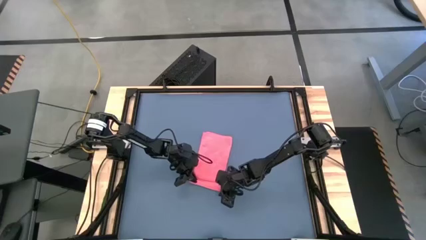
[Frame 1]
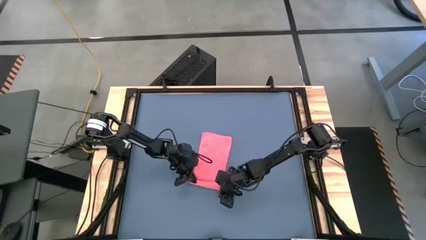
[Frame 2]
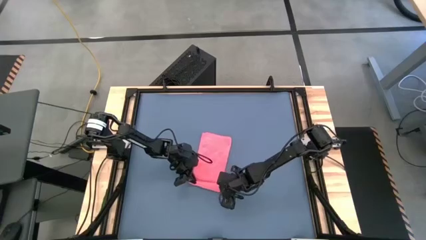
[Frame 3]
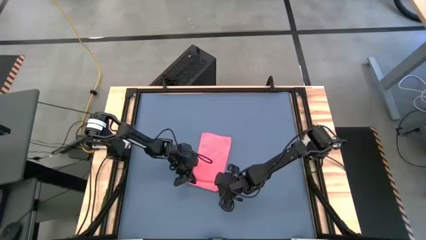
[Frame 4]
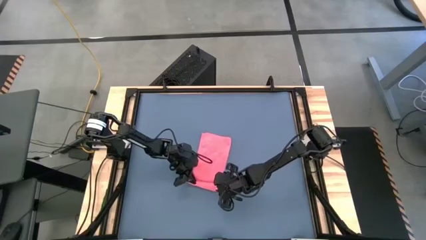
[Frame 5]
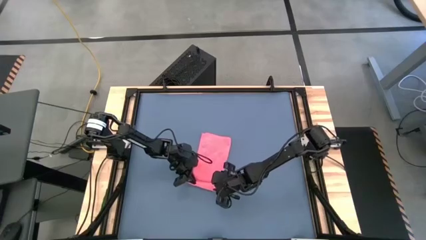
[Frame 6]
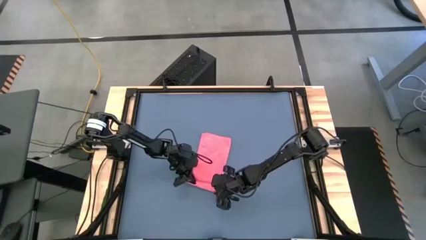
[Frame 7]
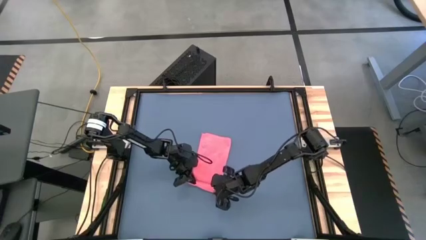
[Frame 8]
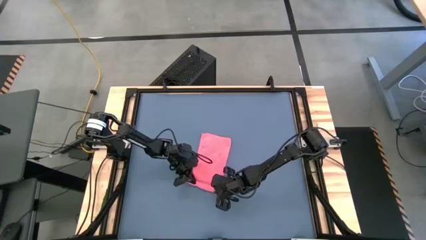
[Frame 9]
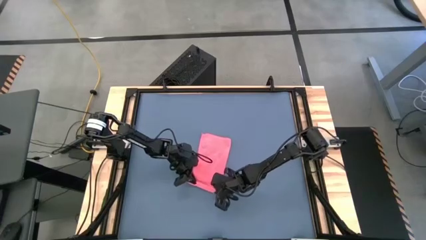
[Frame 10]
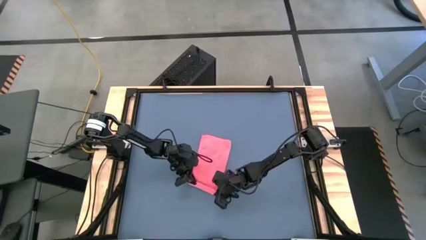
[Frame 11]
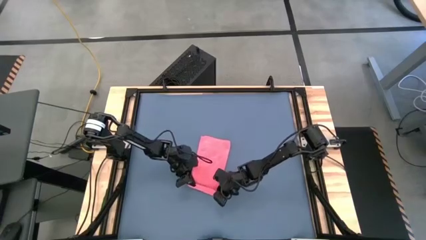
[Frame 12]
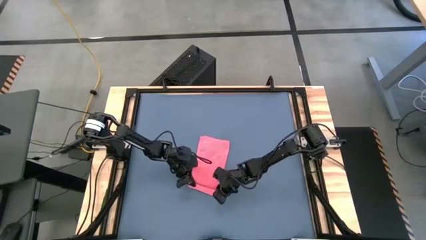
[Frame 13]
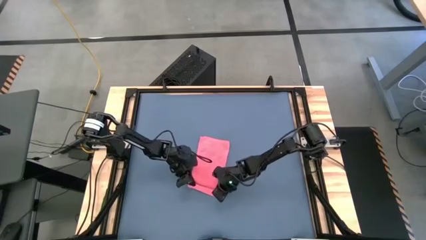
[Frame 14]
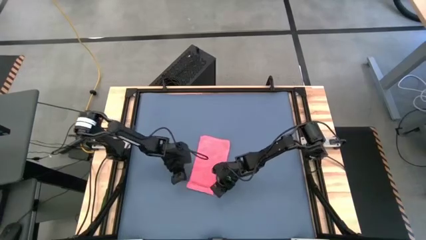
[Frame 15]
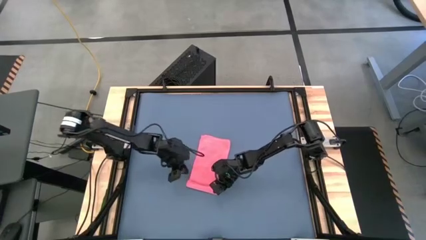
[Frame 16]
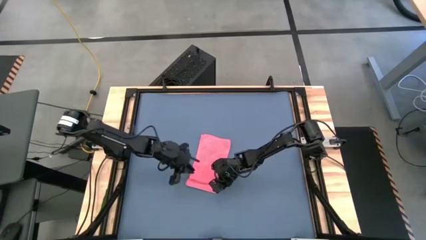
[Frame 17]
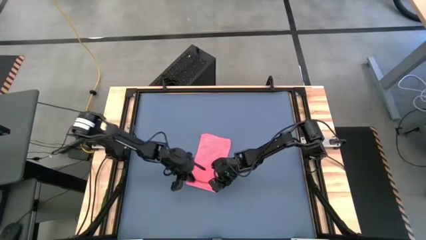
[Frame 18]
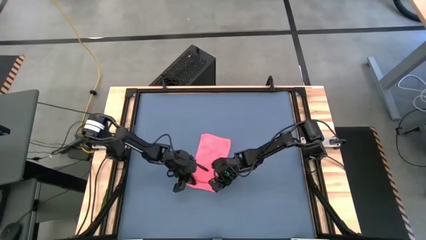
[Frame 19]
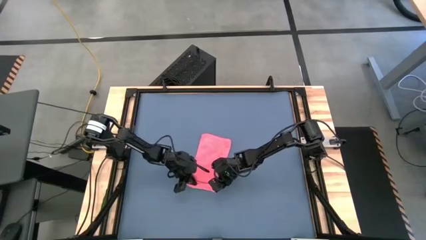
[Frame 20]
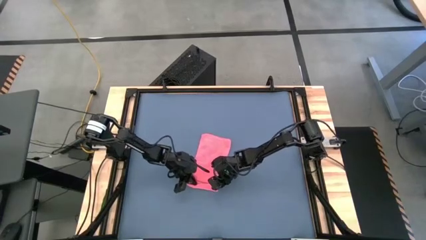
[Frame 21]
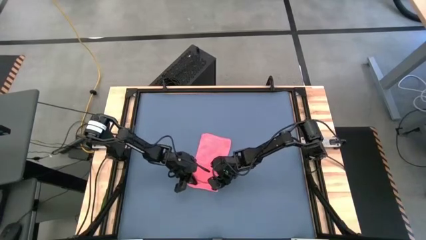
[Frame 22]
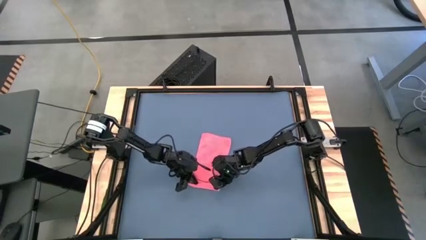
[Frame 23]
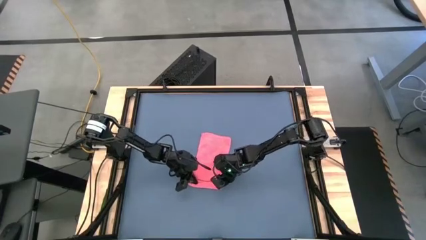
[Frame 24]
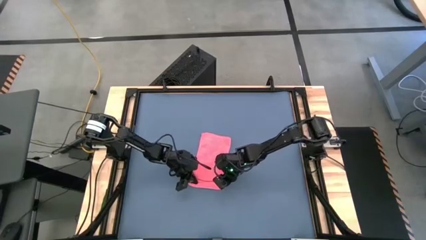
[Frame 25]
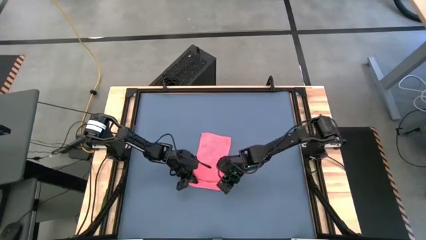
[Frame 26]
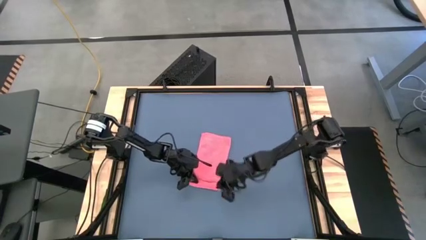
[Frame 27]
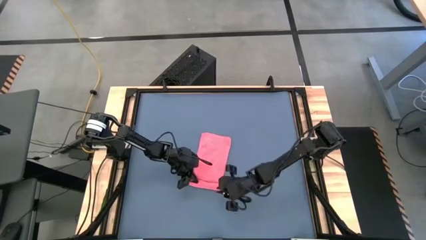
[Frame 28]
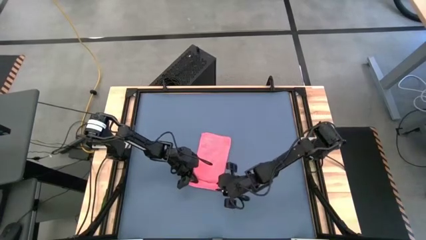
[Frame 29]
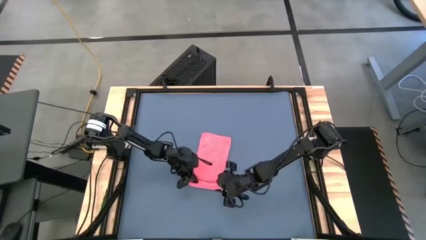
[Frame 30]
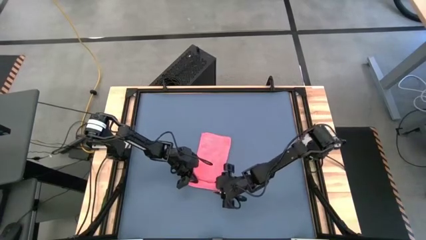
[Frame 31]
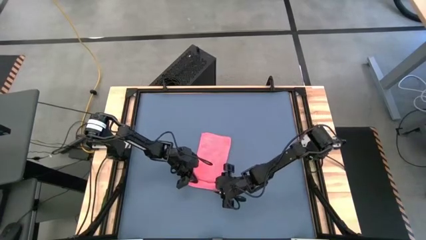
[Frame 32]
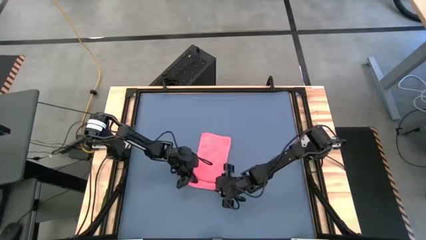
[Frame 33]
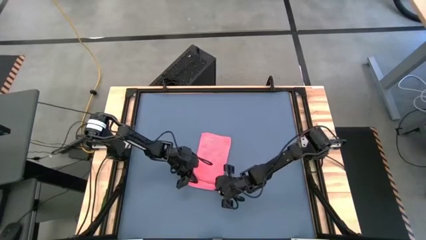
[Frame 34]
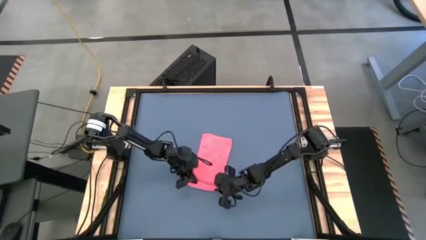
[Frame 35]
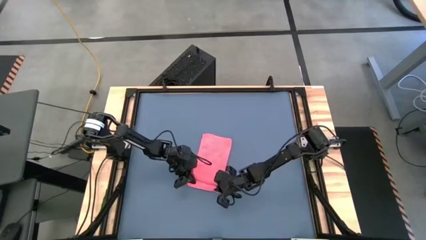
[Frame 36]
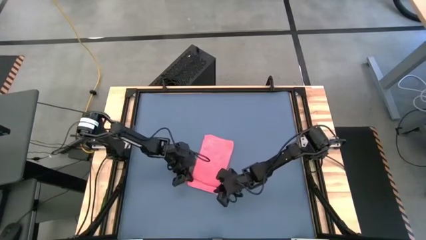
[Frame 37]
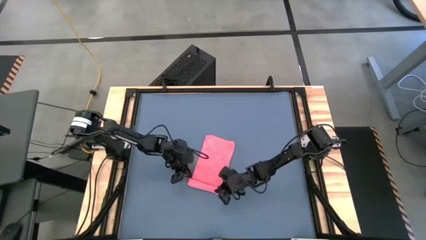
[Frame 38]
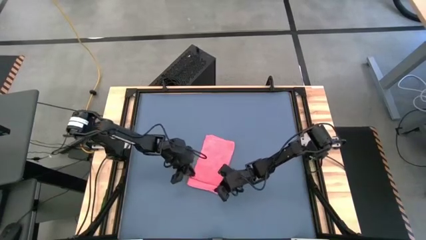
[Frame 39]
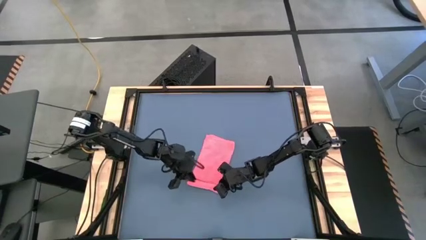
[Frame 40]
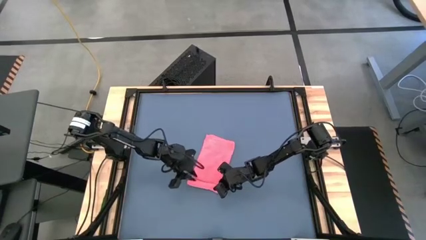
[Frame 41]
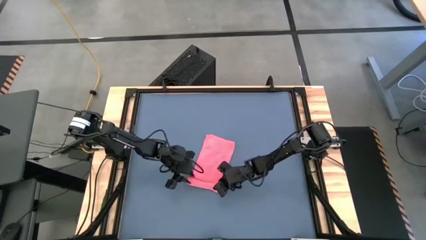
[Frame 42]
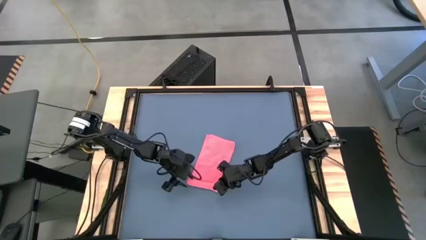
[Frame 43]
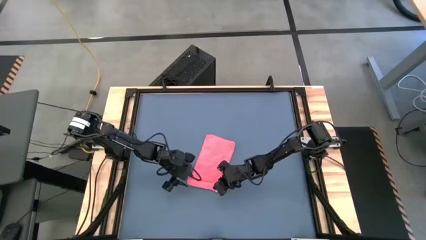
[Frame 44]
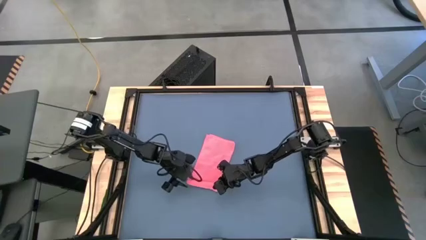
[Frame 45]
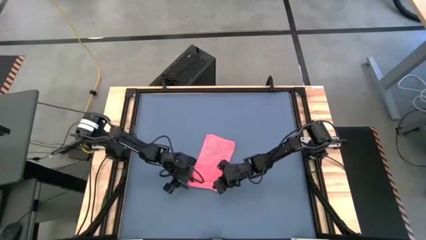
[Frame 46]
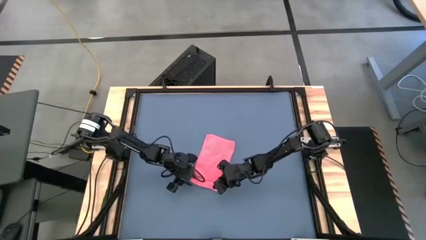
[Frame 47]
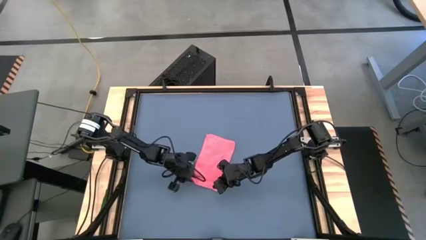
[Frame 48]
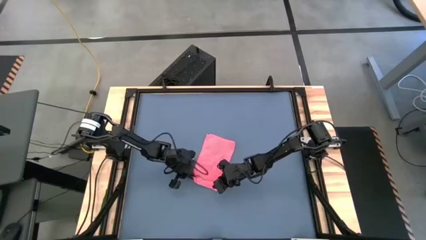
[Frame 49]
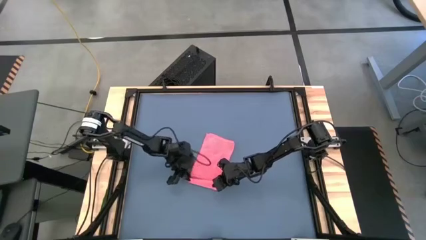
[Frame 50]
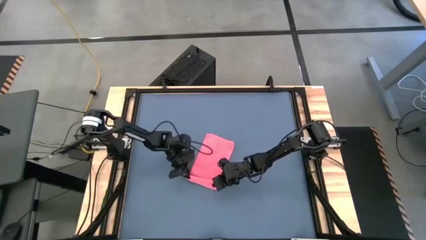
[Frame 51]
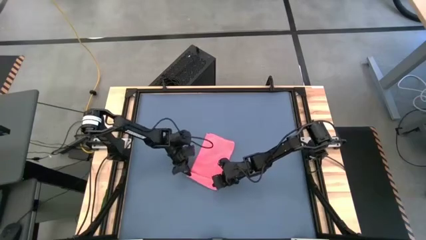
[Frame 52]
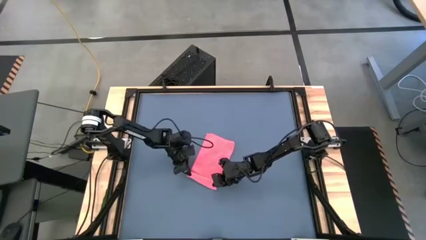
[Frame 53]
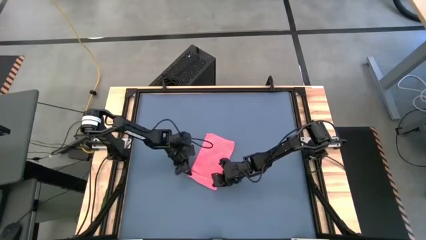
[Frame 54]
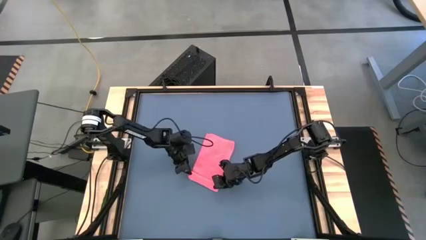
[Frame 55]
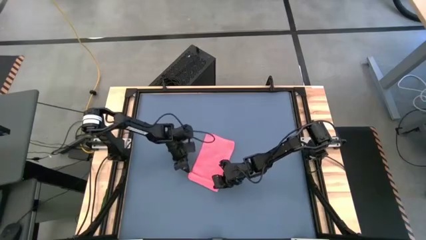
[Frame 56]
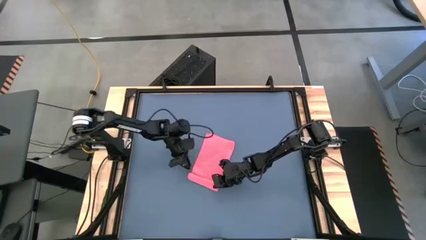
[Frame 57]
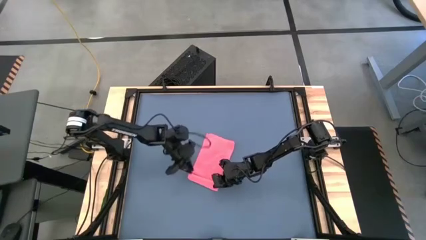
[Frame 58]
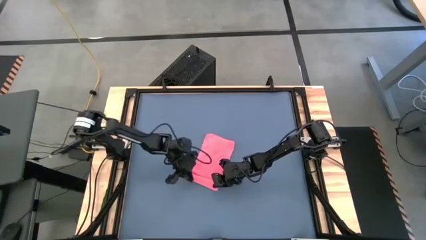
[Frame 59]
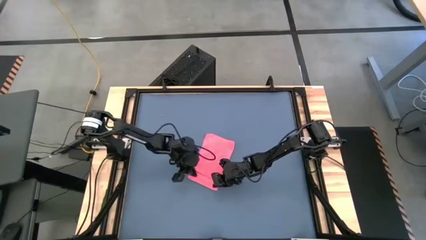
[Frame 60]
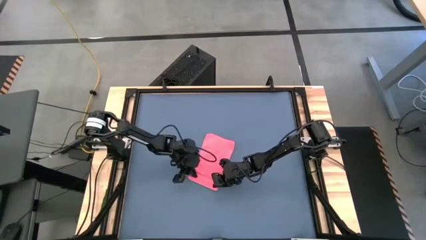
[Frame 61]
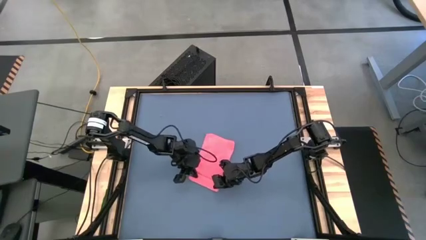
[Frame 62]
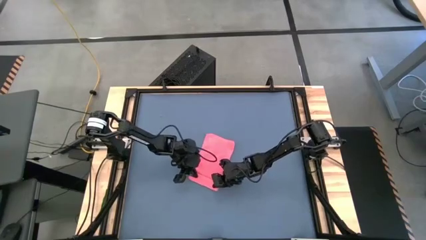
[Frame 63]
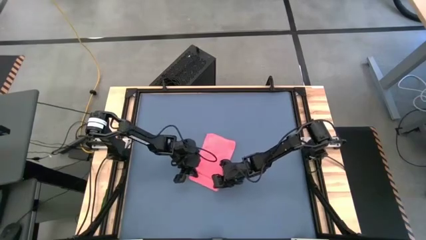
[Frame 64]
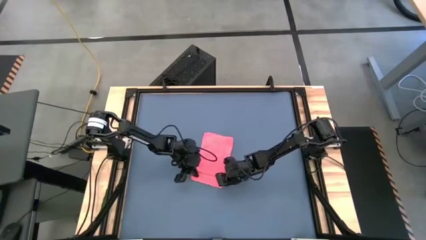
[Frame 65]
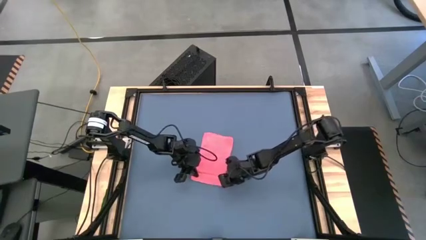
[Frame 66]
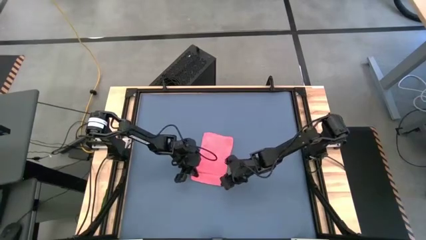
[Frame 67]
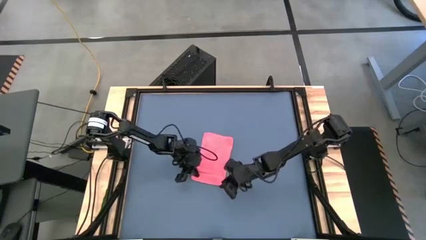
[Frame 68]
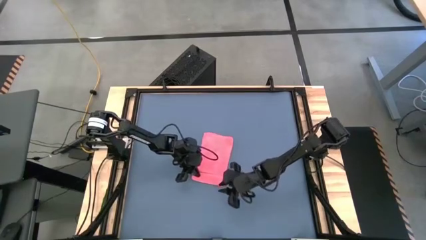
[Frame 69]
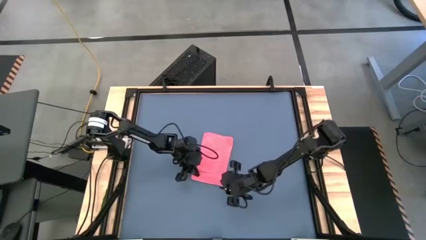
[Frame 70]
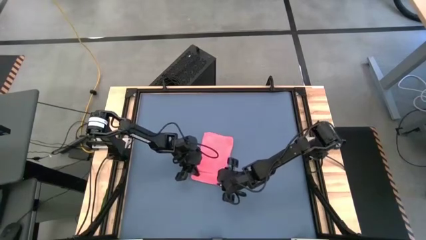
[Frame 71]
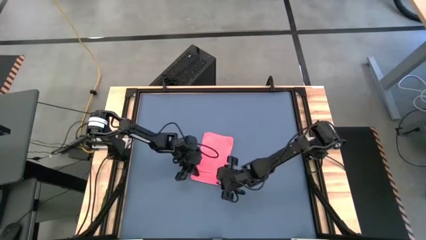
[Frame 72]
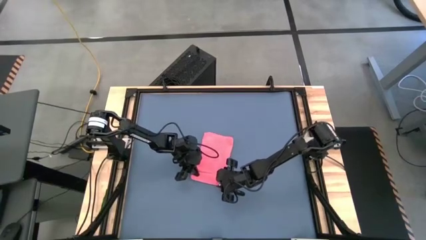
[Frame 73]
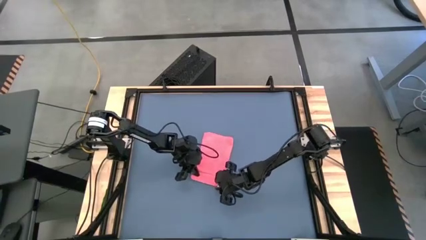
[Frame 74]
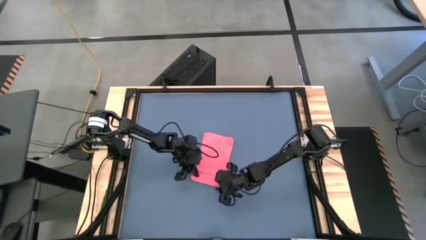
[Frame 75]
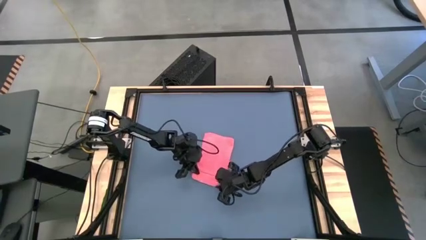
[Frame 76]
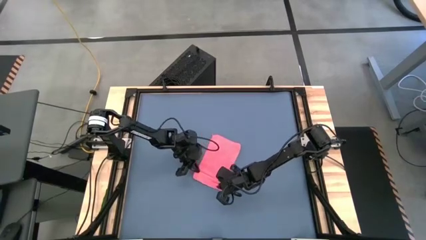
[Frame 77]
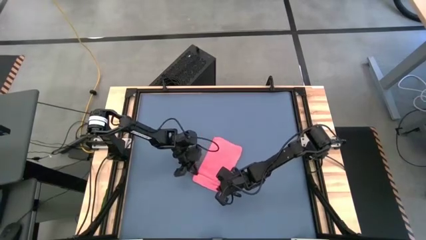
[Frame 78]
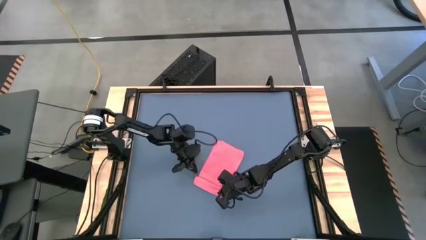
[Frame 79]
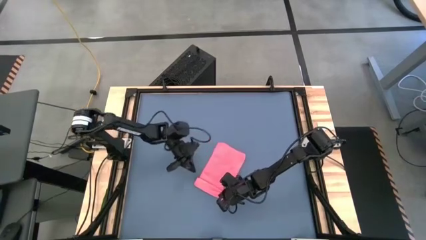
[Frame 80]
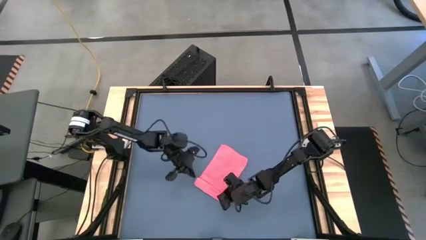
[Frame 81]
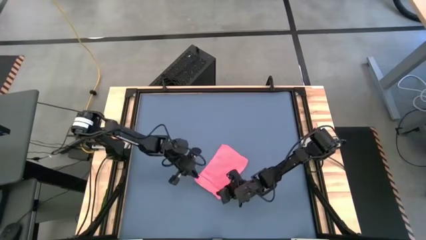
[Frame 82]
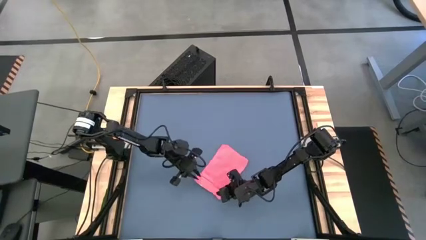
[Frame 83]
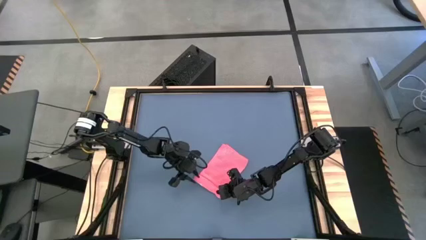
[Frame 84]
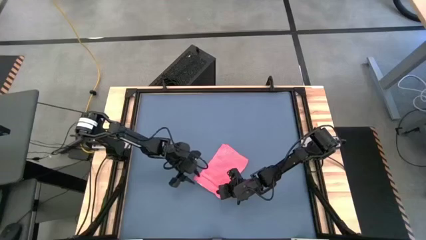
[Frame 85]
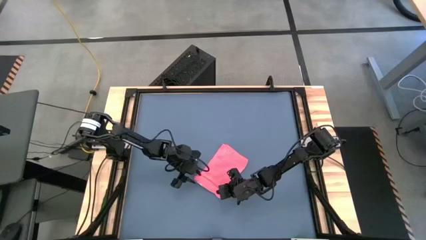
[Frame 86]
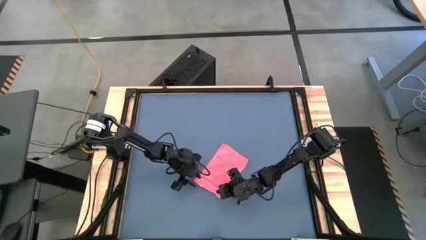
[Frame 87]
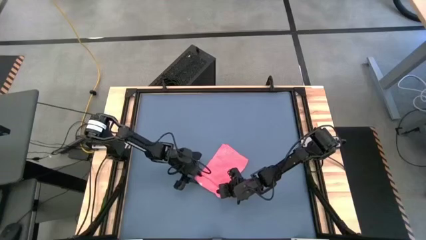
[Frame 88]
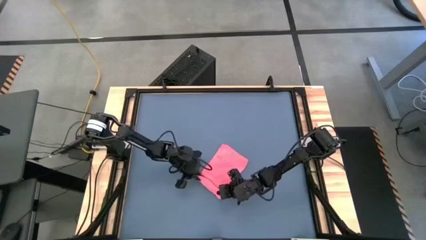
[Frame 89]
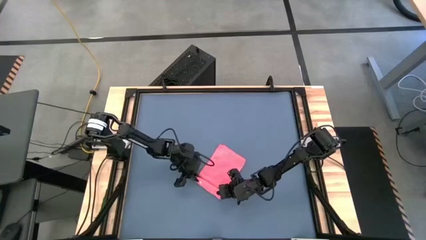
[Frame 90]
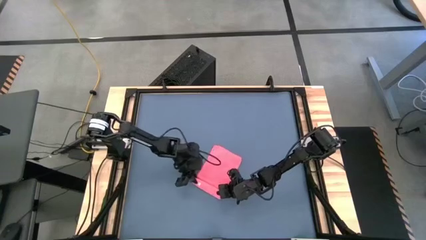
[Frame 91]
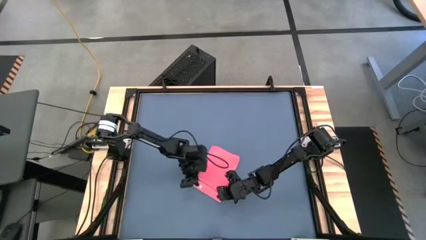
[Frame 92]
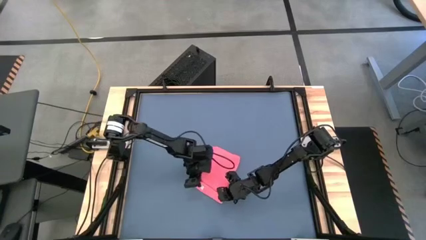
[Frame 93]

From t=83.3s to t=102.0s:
Task: Roll towel
Roll the pink towel
